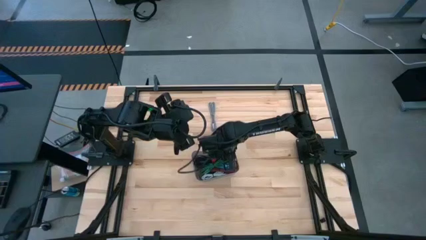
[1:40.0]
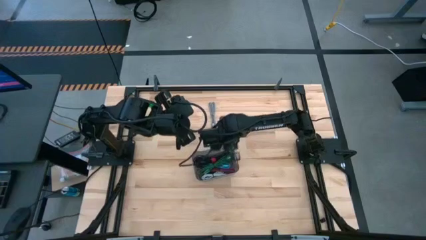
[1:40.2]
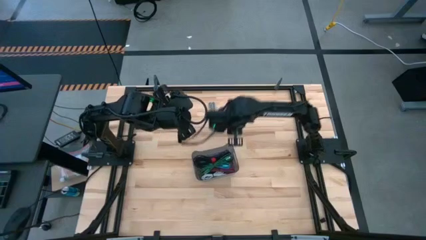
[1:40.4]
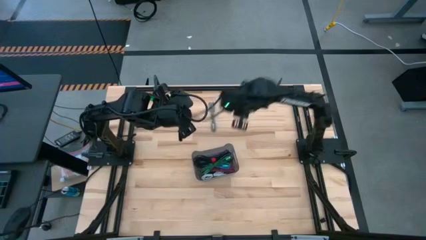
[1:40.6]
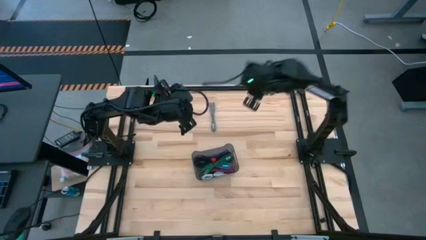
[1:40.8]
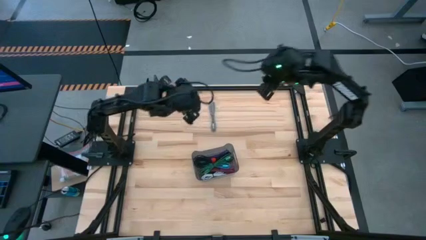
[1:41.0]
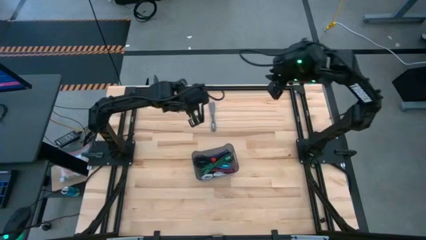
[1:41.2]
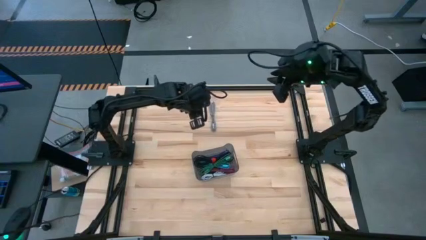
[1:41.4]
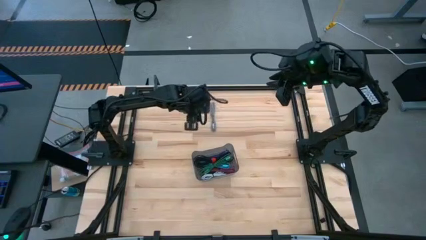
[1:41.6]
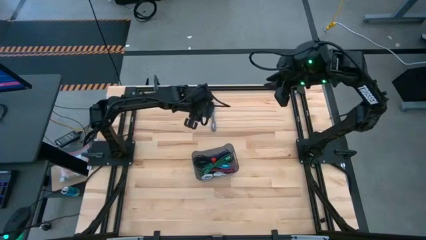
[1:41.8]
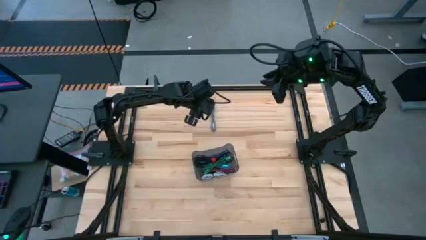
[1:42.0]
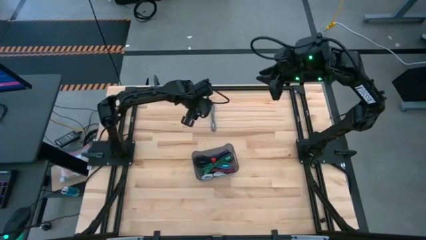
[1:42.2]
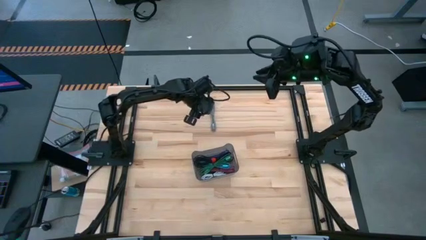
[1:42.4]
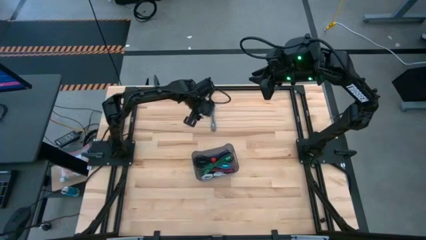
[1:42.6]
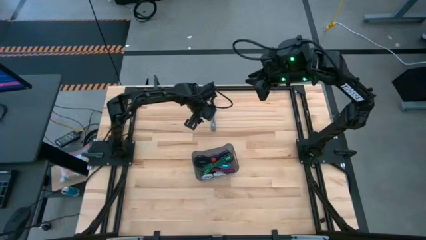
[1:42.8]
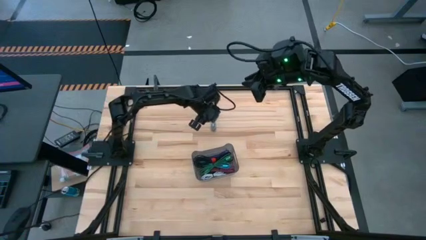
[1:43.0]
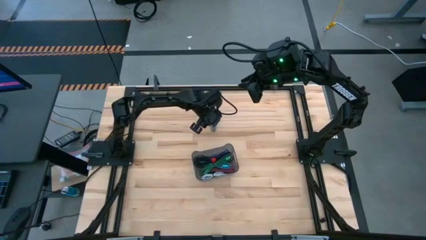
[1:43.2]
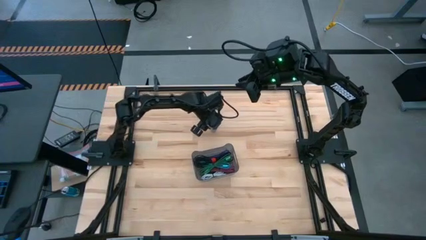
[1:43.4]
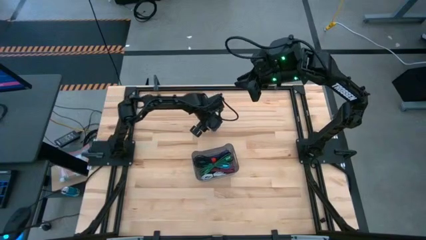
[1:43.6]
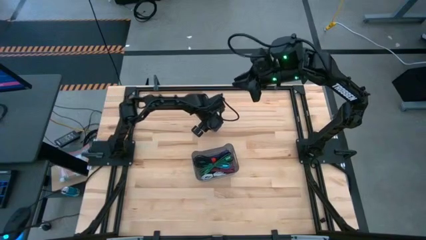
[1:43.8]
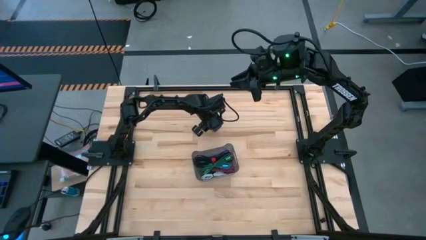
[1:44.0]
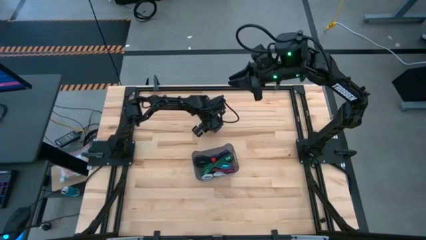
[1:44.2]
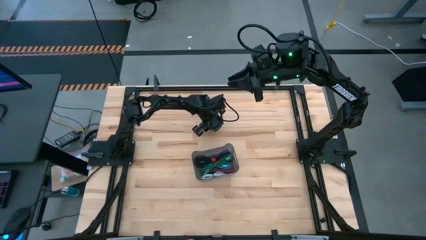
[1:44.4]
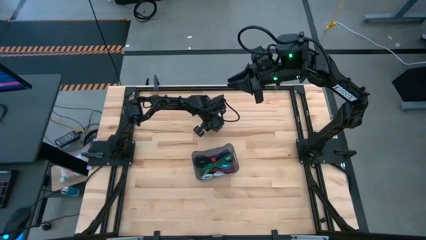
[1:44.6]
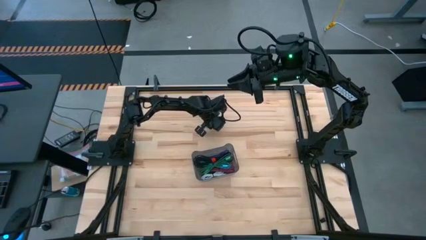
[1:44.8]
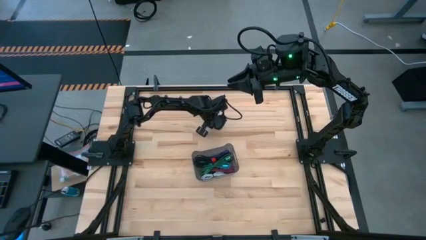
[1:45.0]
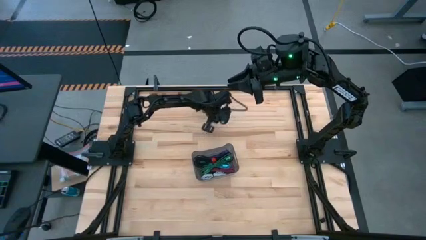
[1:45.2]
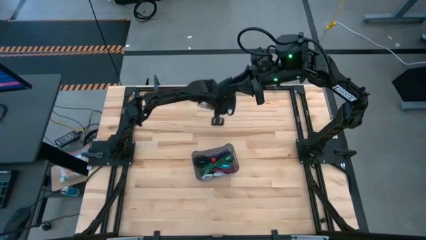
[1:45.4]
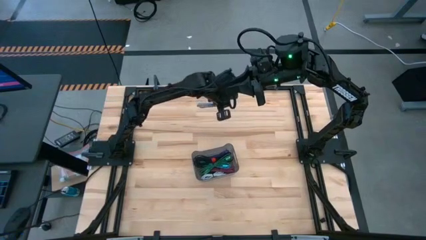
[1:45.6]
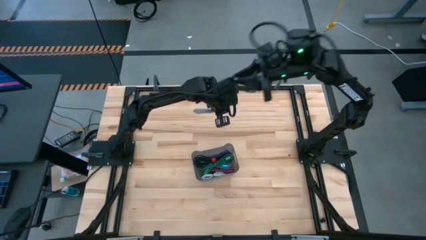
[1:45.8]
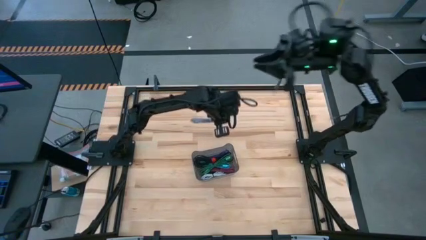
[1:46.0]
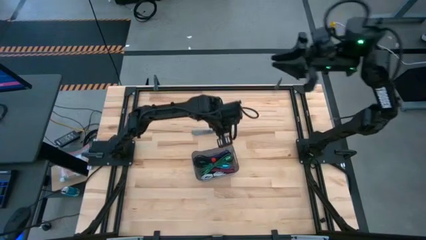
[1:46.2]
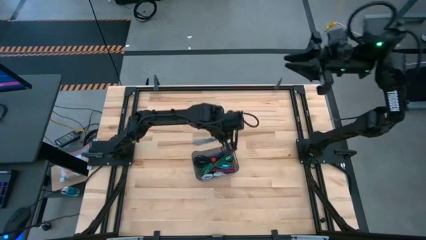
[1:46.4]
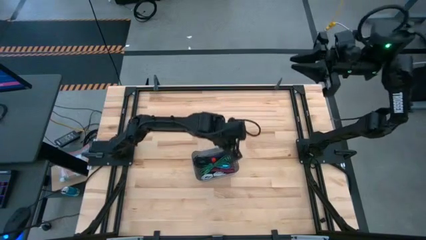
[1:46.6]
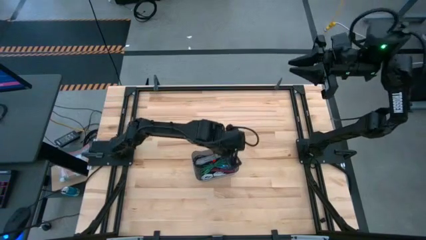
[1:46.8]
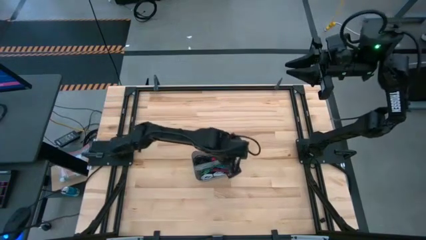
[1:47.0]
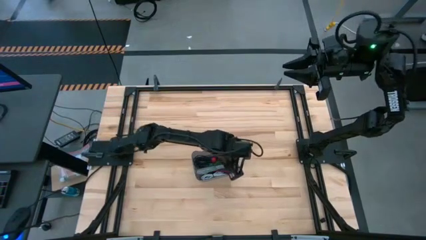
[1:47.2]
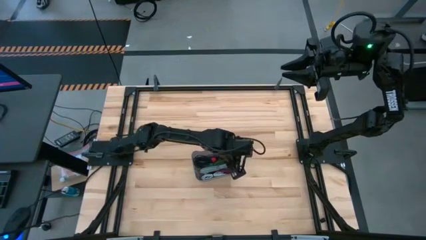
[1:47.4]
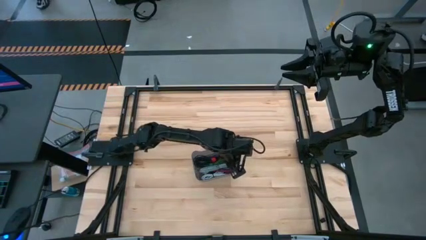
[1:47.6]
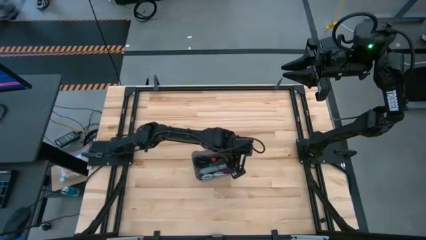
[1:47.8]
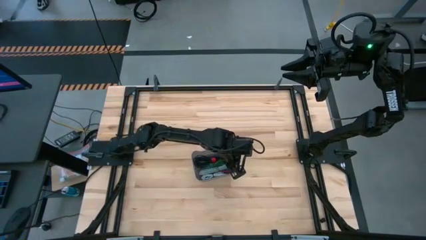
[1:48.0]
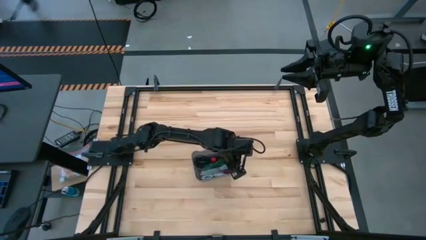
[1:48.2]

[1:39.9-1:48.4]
Task: Pick and place USB-C Cables
Put the black and white USB cable into the black bin

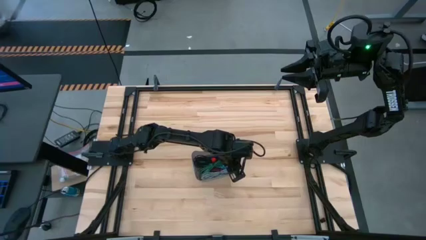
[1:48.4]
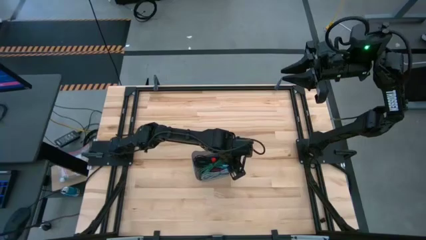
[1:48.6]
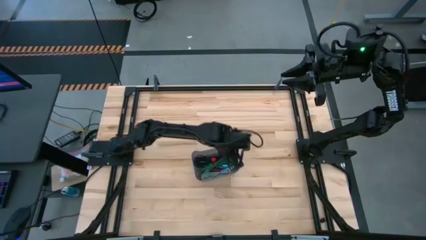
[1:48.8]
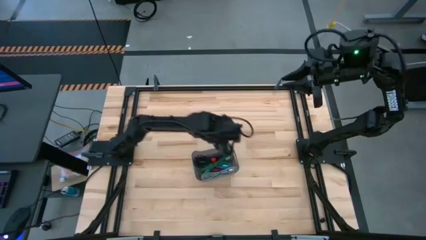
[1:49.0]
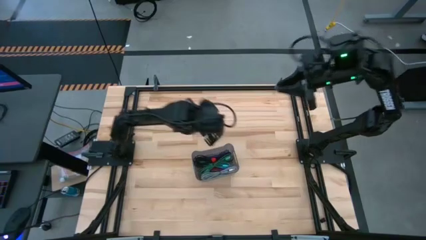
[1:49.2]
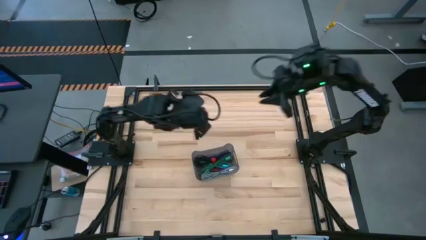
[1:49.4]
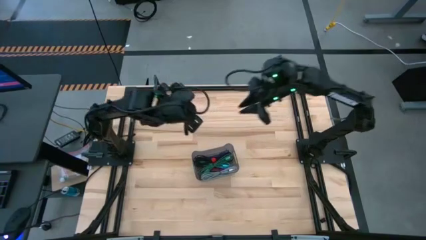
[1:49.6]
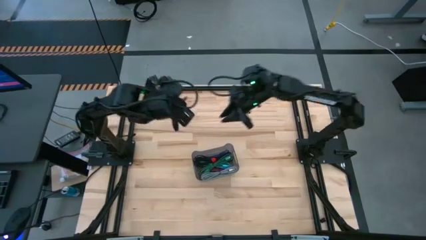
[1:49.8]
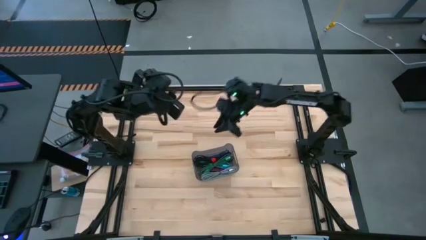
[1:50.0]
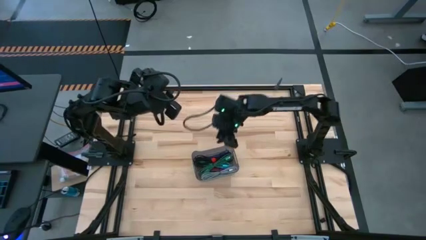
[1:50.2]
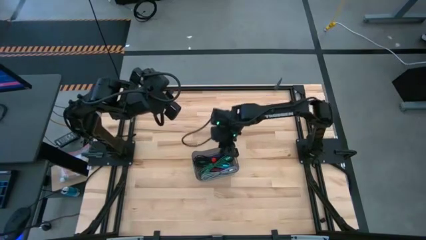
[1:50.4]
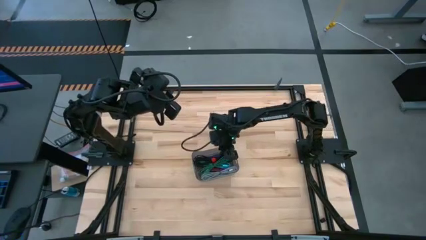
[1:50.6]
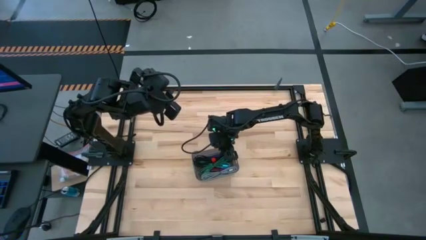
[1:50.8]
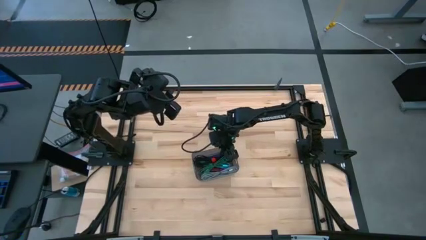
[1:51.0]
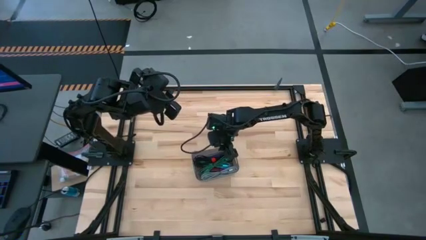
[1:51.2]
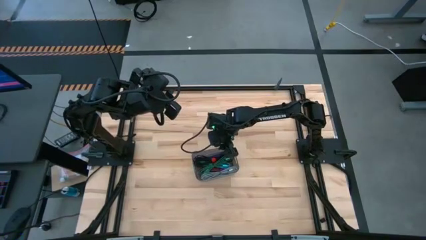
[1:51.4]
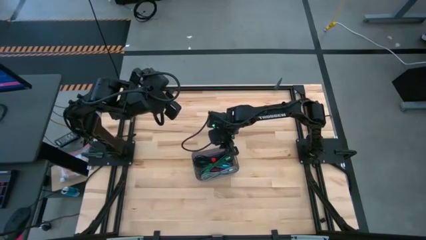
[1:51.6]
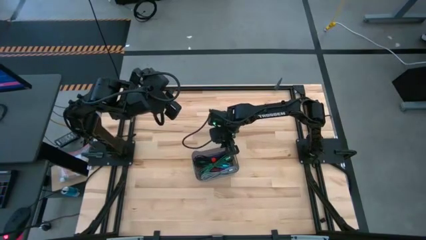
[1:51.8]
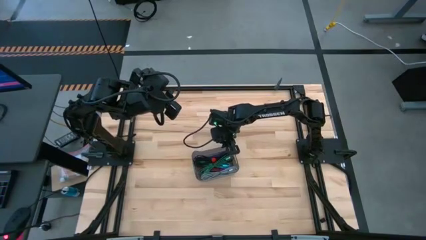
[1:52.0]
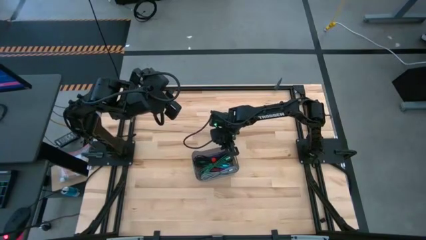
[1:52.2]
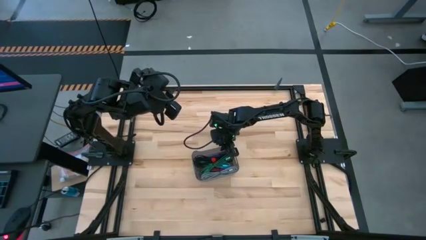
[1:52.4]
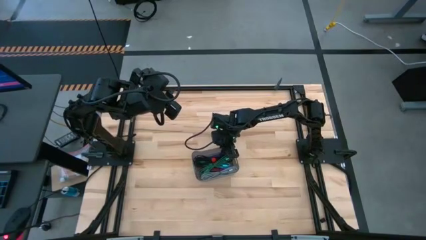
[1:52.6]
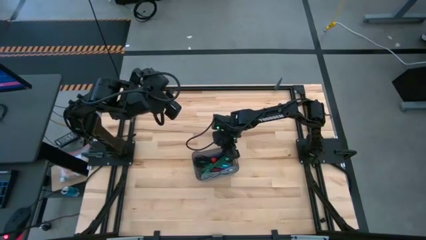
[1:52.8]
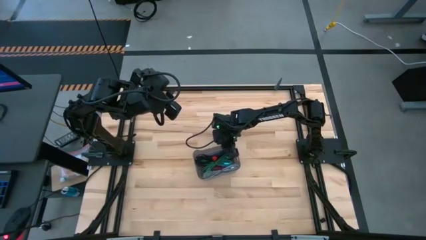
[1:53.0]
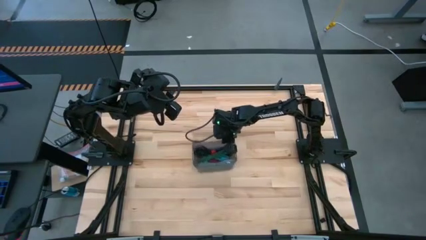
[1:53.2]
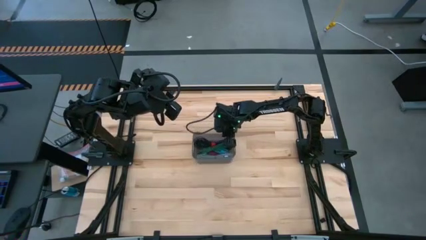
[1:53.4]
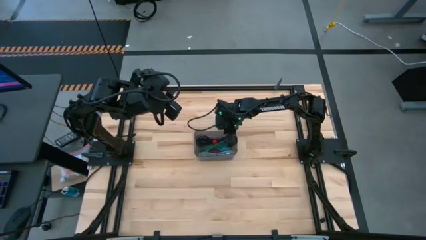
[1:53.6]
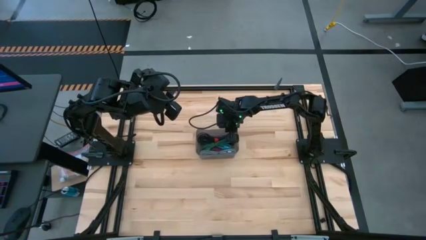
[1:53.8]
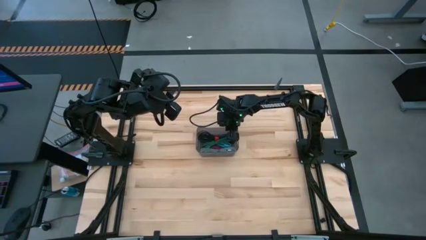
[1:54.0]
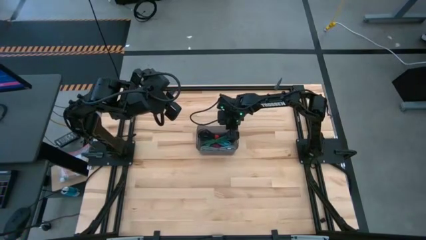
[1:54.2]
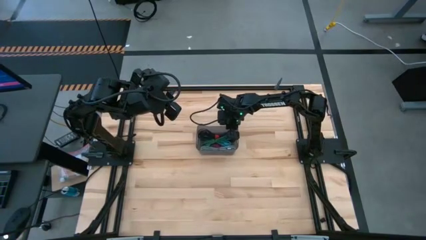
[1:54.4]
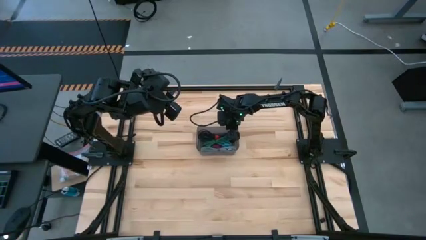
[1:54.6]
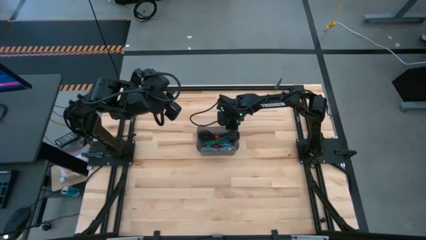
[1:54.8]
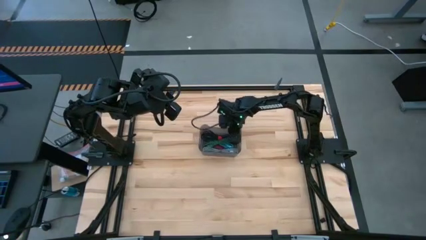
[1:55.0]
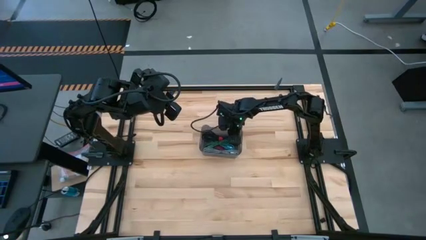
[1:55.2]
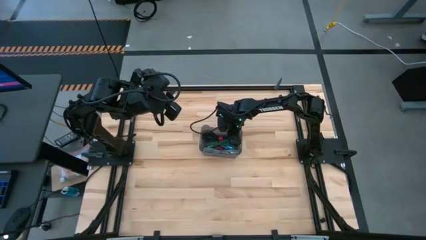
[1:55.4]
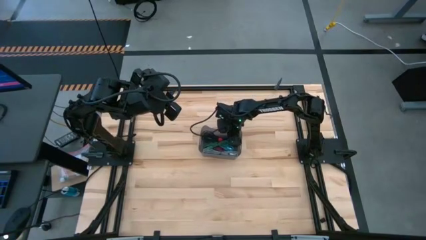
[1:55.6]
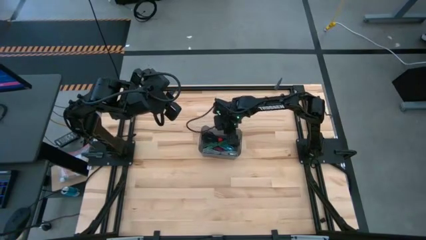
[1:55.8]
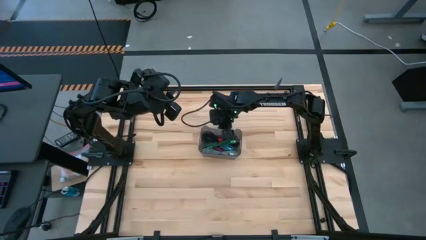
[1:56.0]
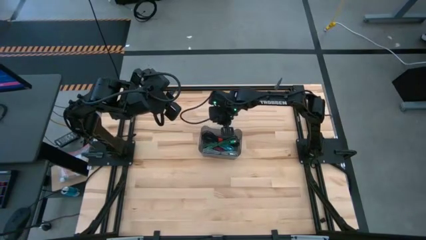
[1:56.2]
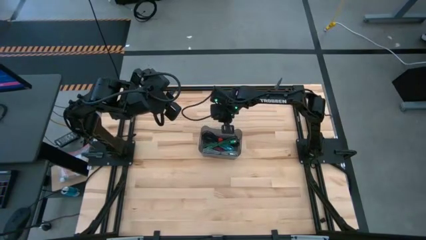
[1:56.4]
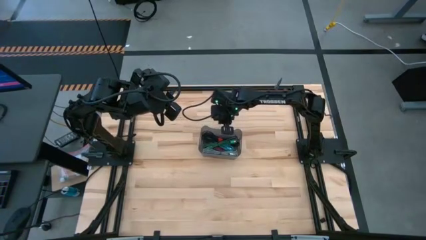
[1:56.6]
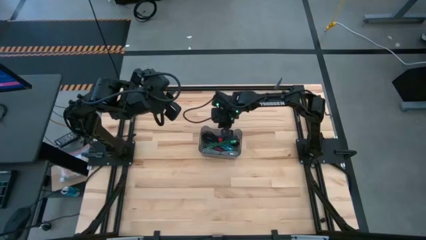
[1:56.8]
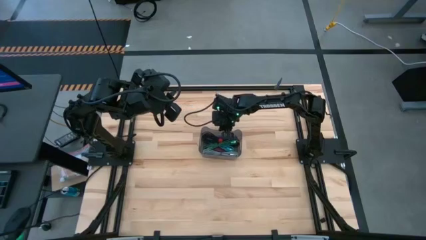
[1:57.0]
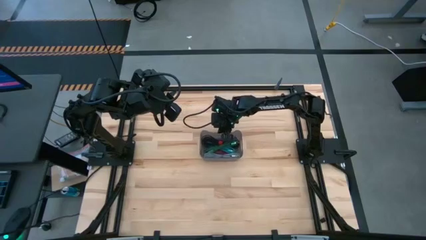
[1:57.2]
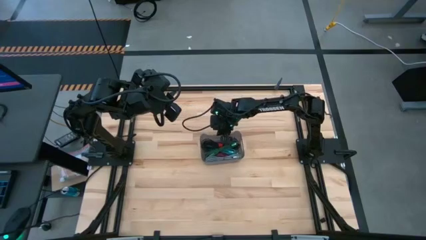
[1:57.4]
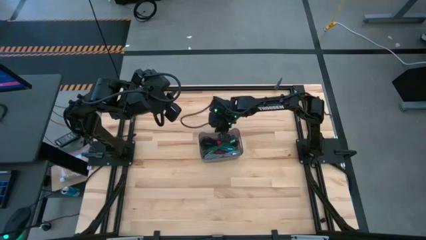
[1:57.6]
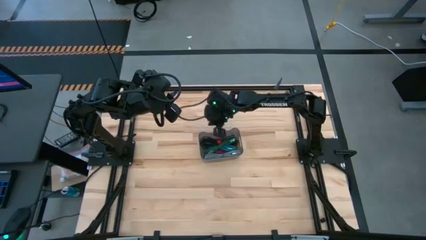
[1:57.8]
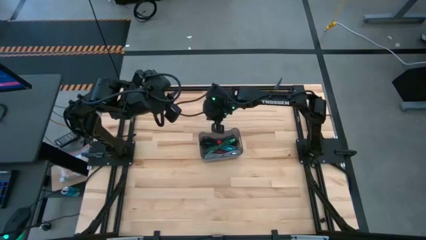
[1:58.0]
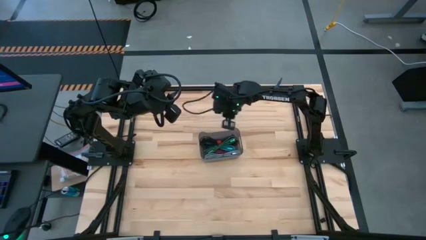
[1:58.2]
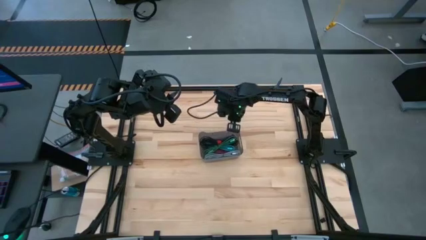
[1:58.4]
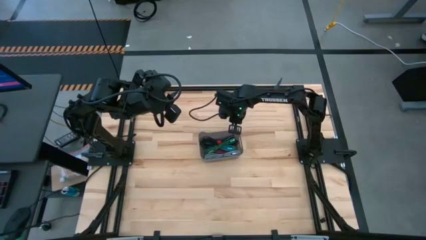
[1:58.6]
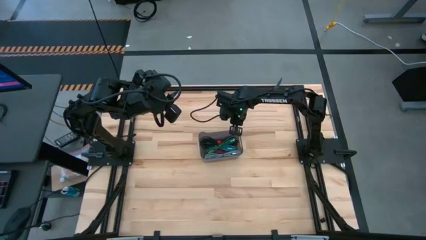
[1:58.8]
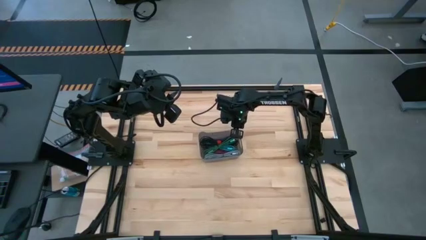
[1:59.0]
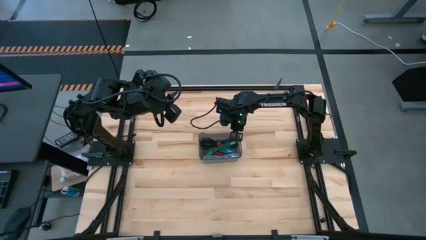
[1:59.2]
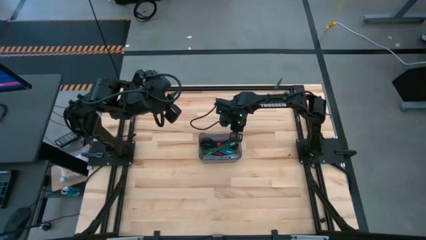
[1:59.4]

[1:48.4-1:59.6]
Adjust the black bin
